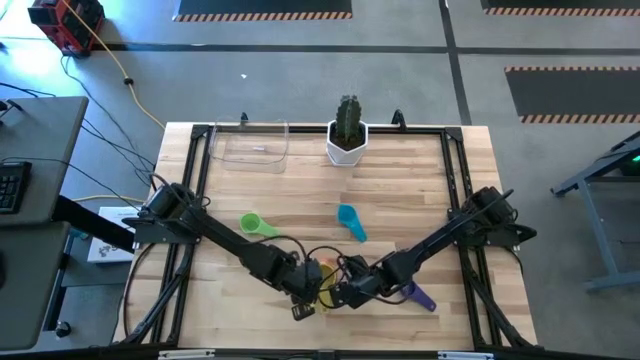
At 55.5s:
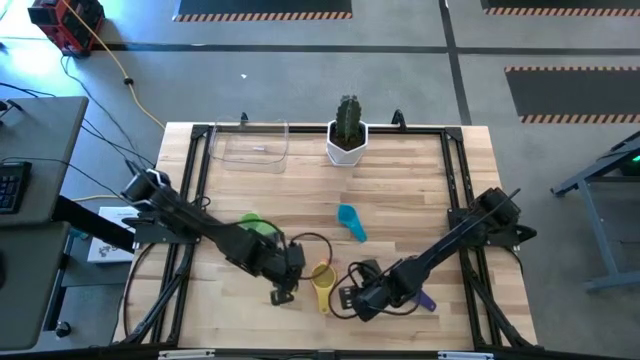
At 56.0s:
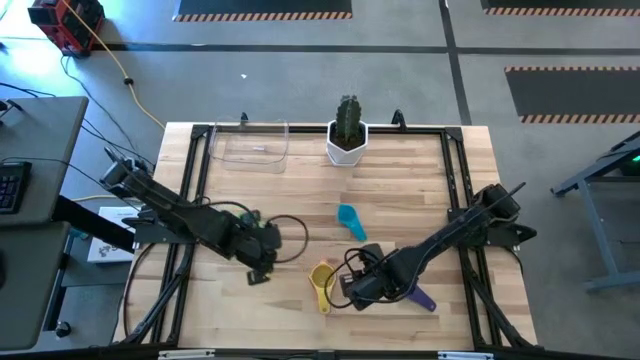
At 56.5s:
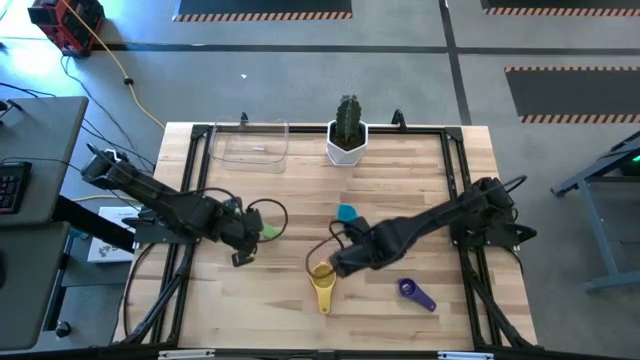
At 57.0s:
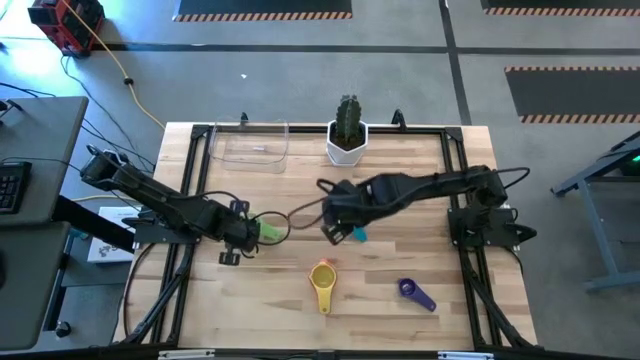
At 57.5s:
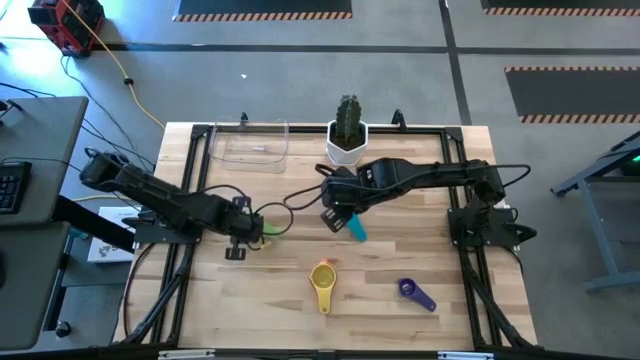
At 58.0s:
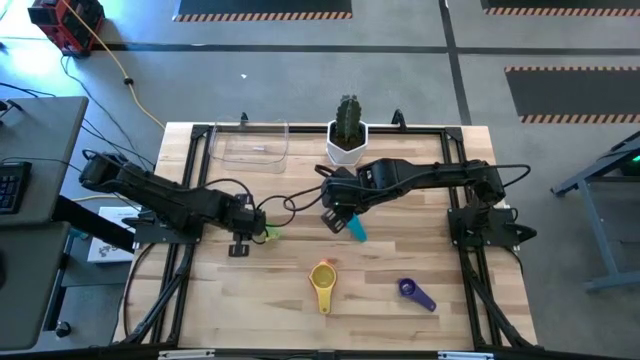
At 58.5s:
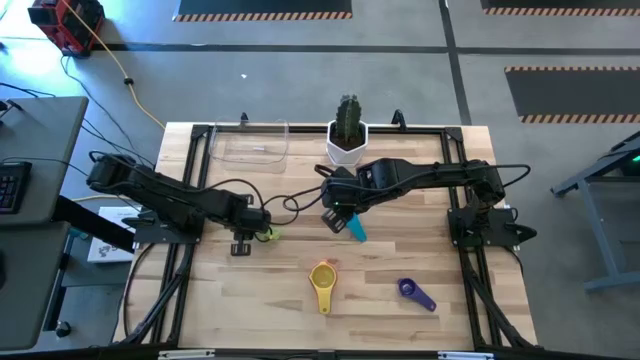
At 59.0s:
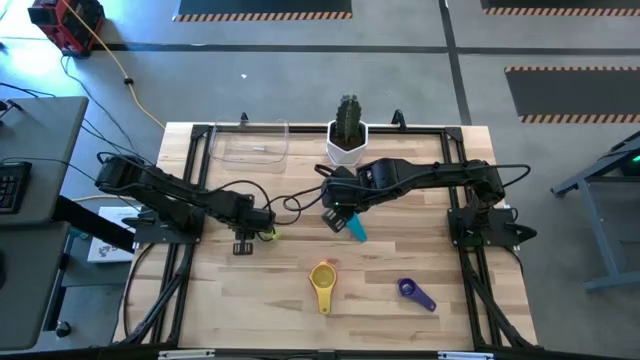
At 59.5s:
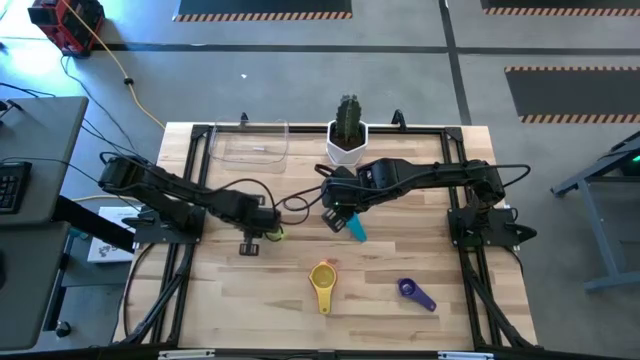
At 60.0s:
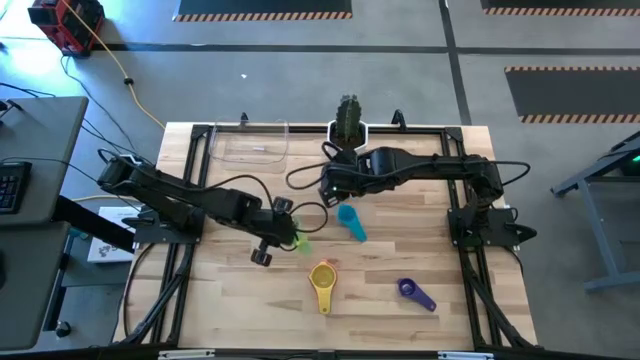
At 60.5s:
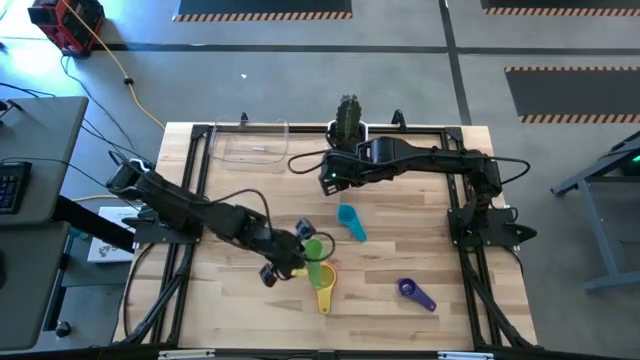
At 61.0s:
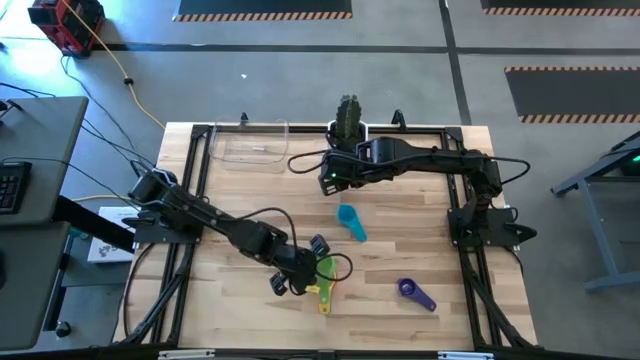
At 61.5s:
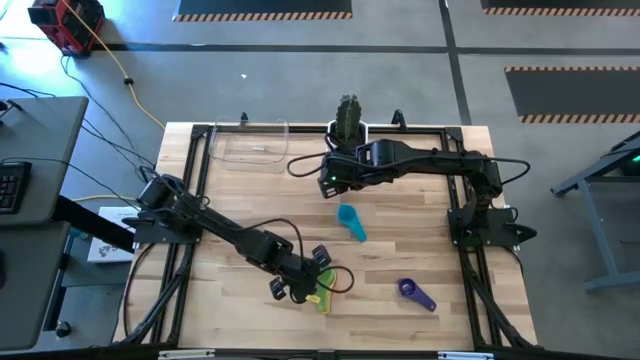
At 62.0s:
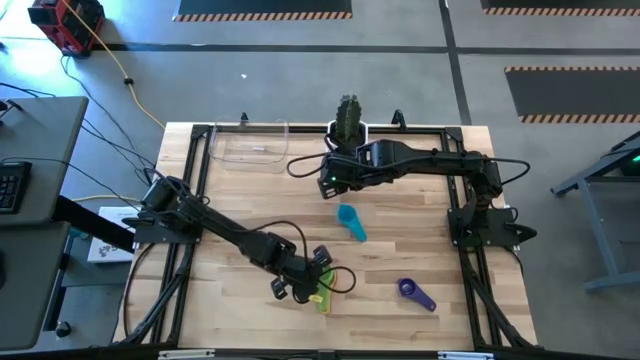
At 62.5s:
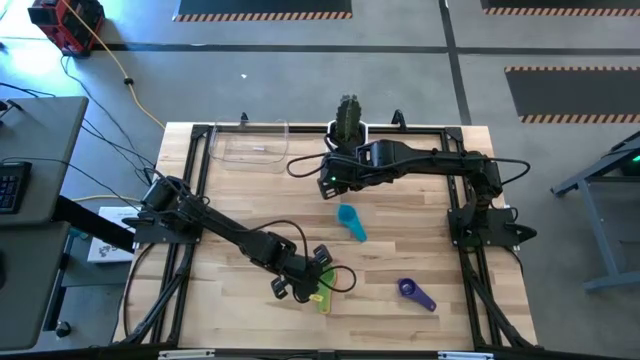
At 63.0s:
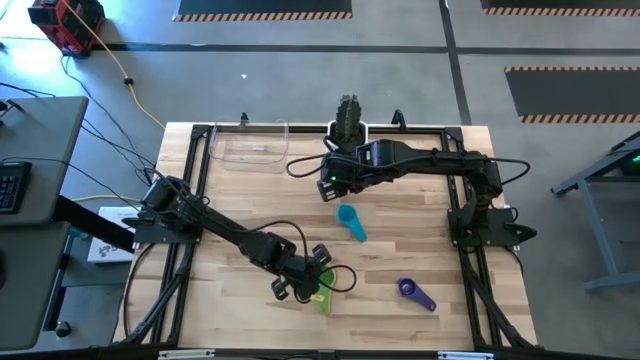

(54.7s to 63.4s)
Task: Nest measuring cups in basket
Stack the green measuring cup on the yellow measuring cup

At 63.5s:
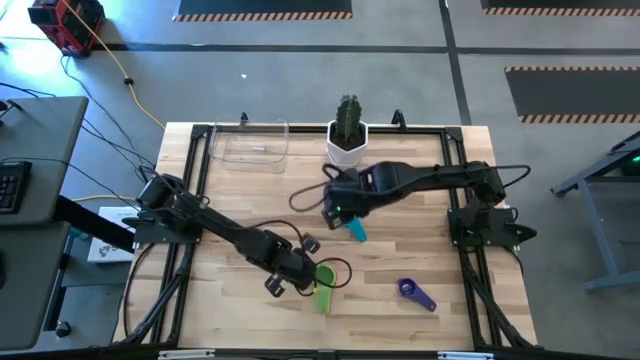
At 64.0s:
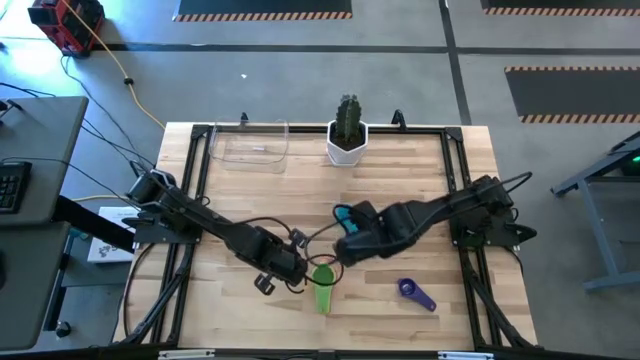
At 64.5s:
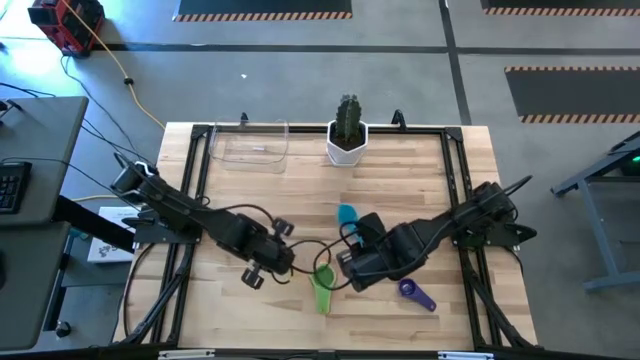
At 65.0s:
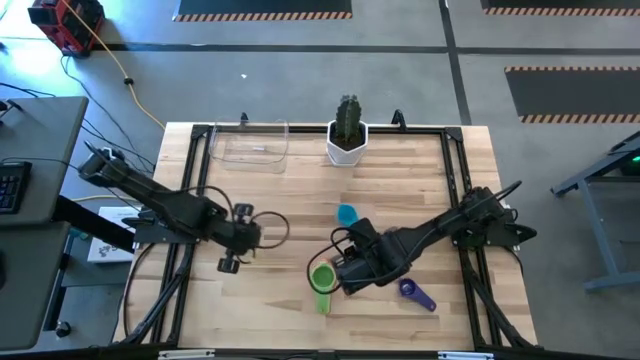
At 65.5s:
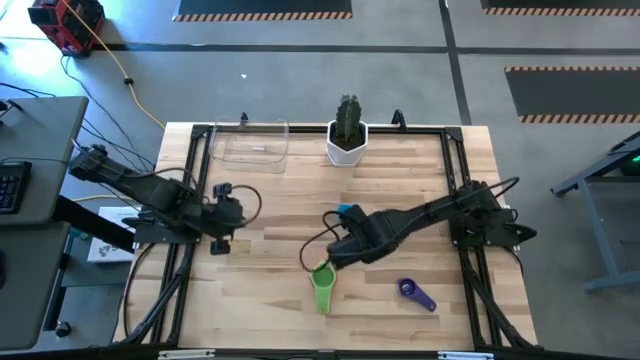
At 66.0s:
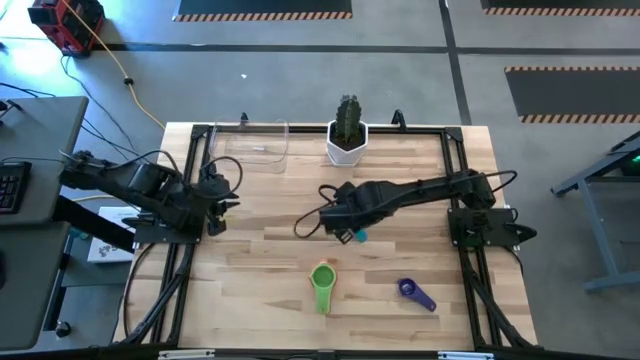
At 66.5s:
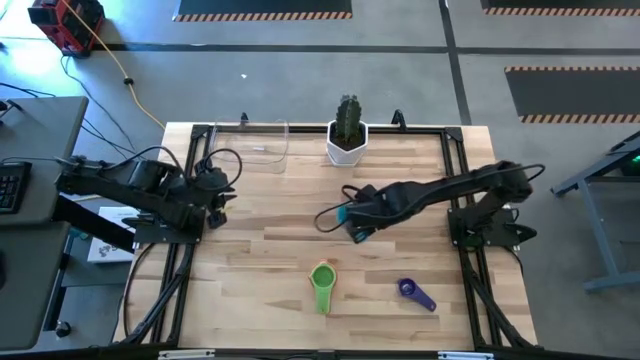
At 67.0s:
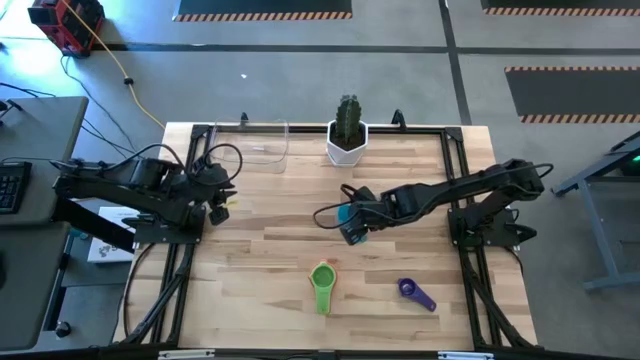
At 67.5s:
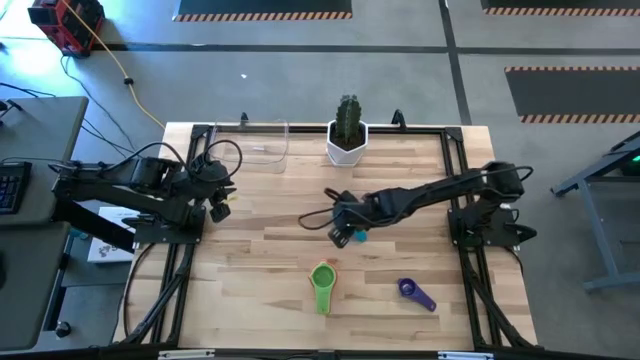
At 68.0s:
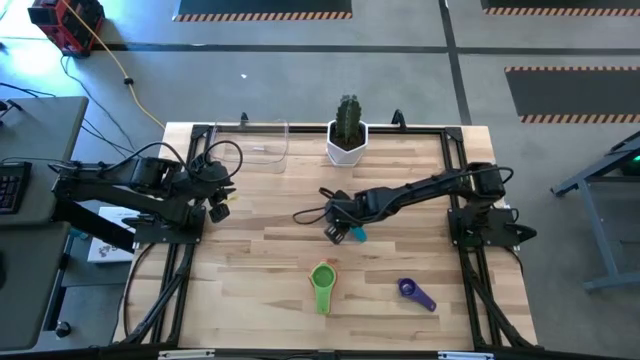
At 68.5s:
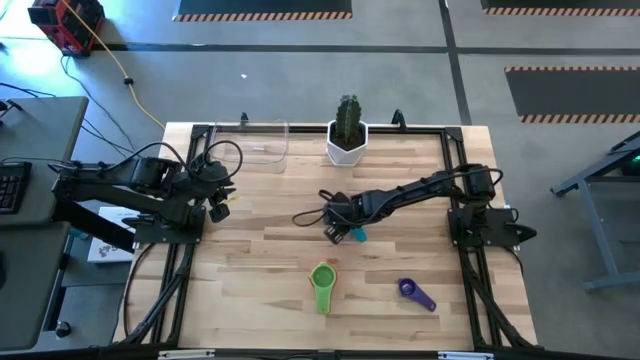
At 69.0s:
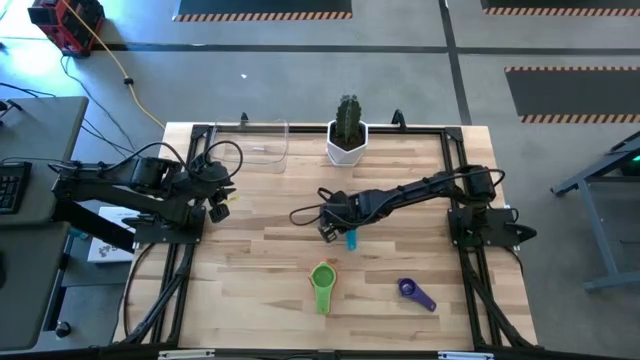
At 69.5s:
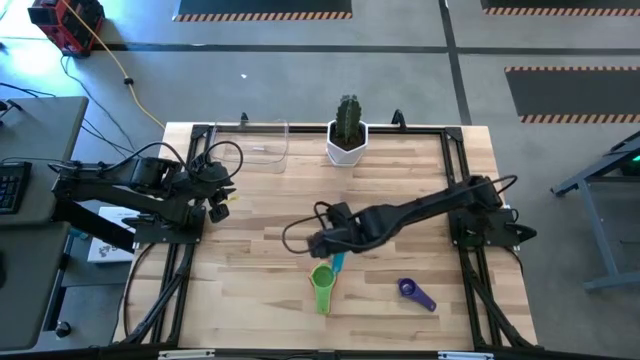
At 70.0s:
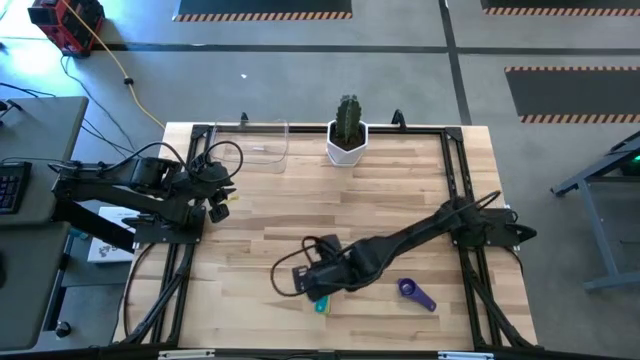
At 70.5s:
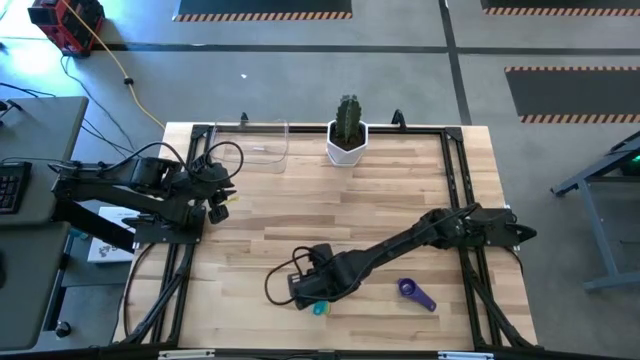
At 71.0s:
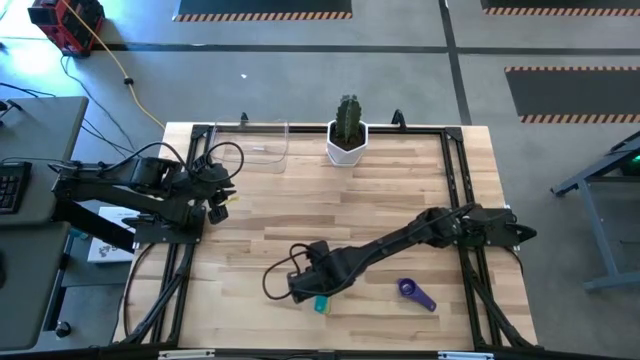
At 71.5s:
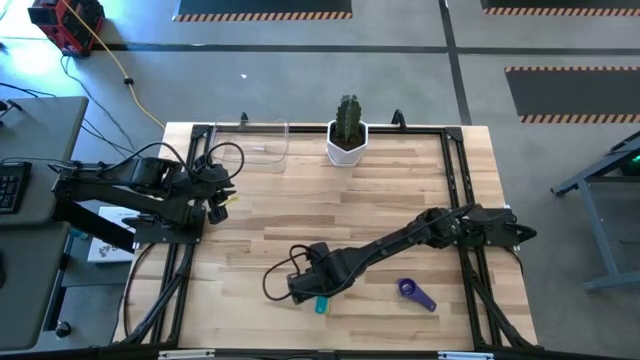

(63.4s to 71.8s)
Stack the light blue measuring cup on the green measuring cup

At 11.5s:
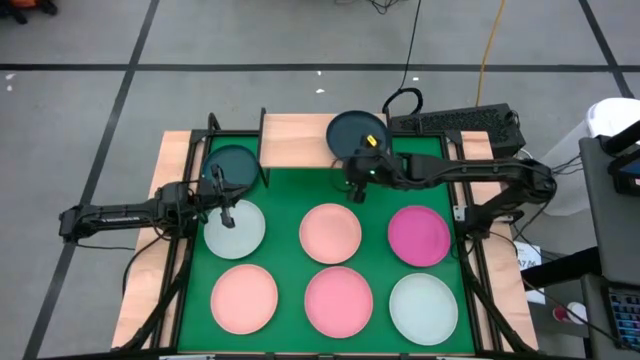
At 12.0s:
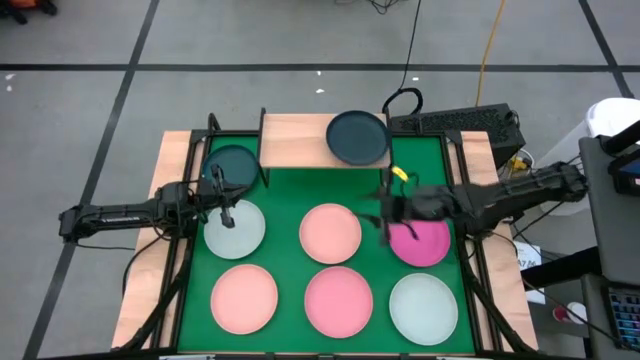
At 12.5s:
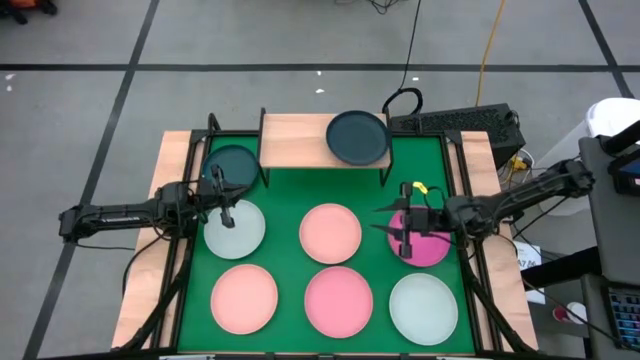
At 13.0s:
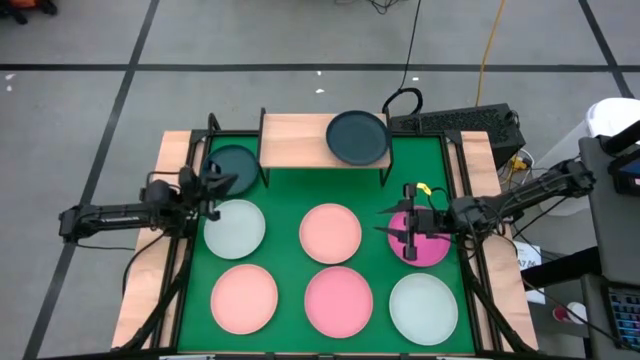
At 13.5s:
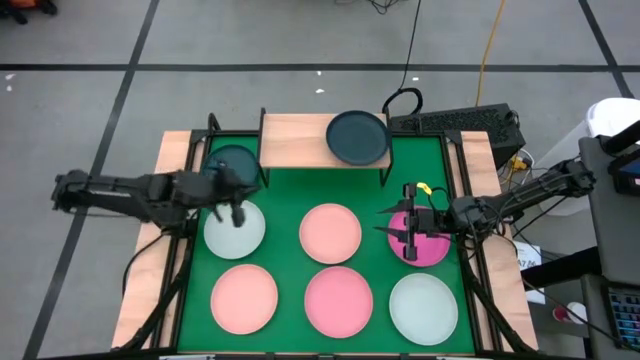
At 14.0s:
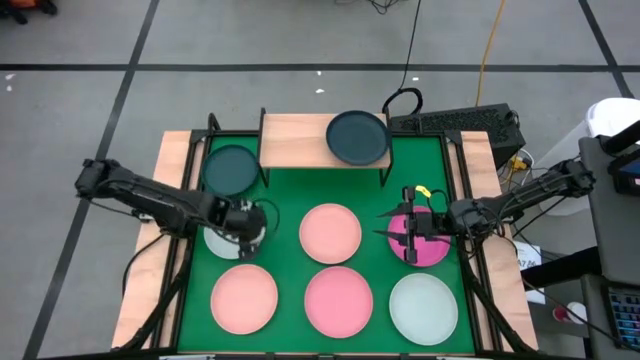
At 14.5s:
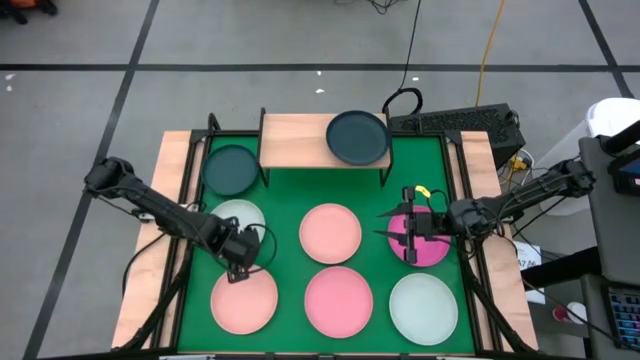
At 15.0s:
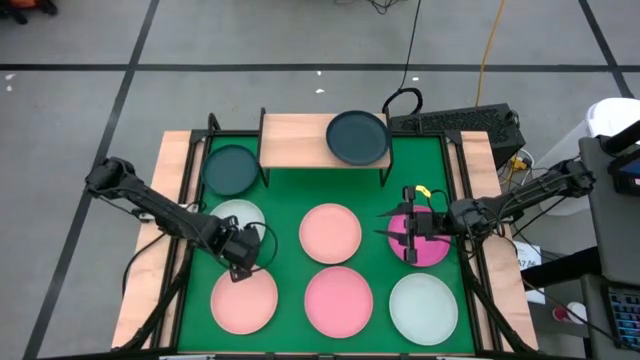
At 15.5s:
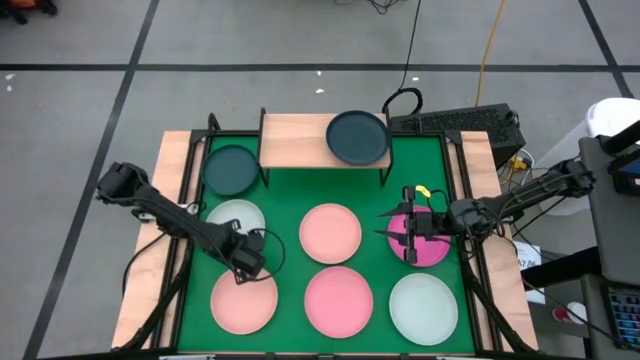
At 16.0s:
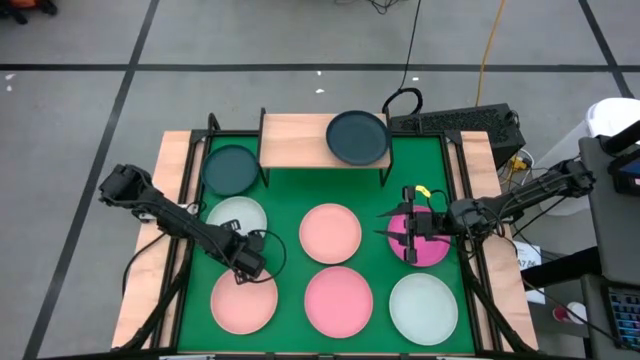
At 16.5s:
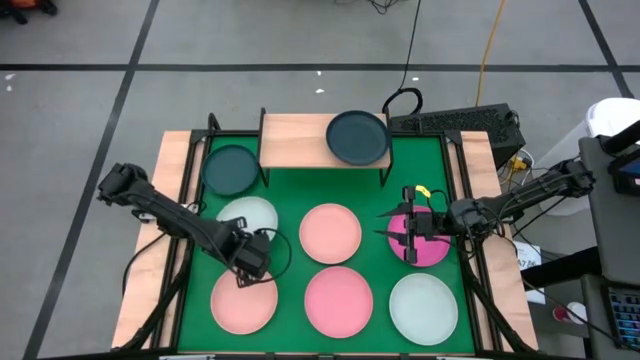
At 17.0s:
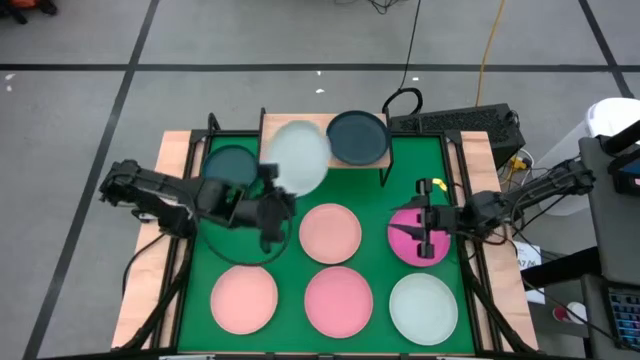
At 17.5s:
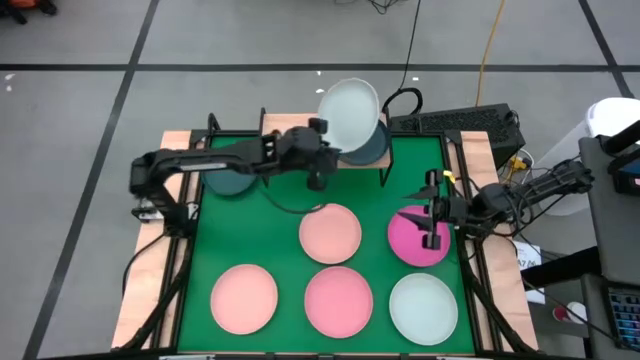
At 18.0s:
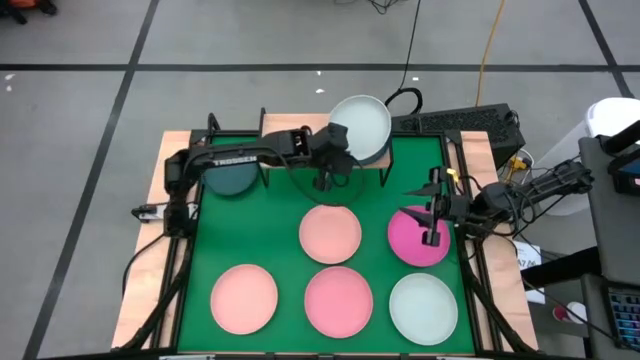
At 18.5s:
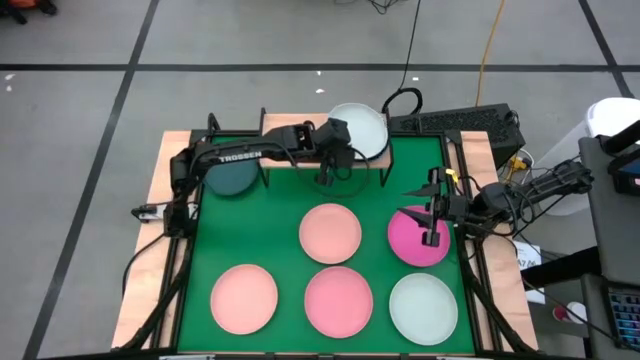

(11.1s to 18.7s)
Task: Place and stack plates onto a shelf
Stack the left white plate on top of the black plate on the shelf
